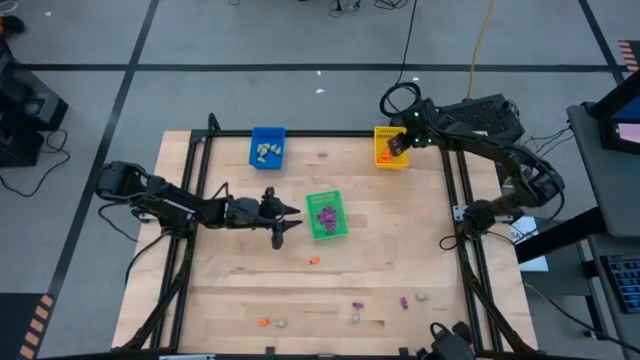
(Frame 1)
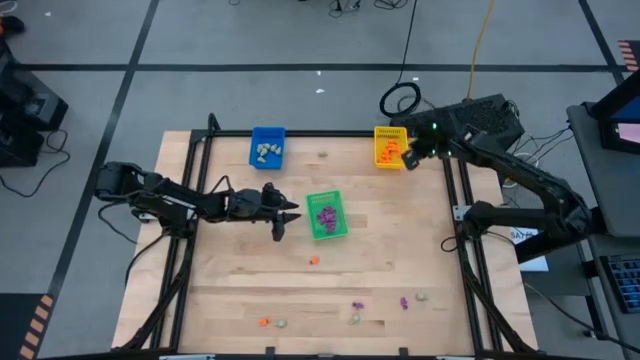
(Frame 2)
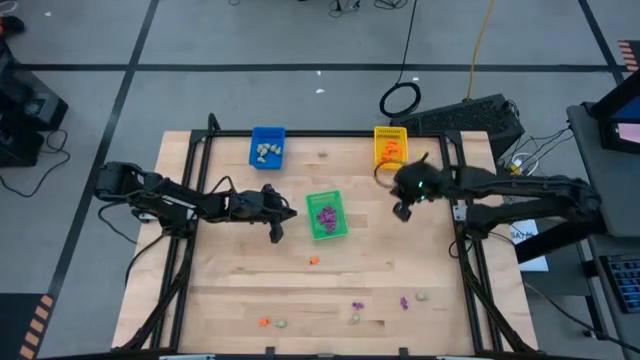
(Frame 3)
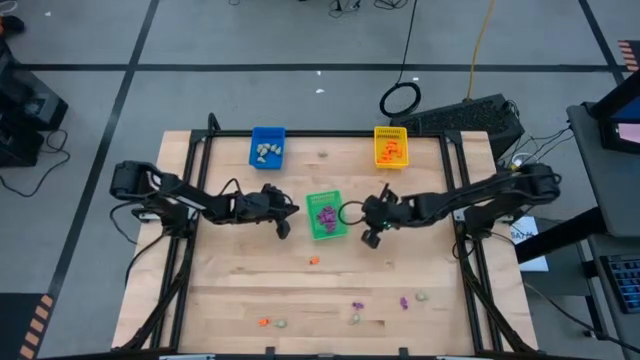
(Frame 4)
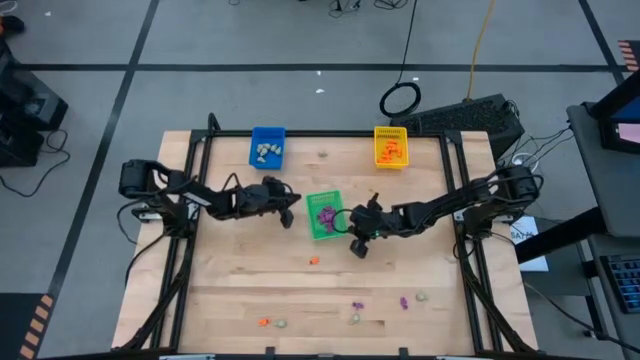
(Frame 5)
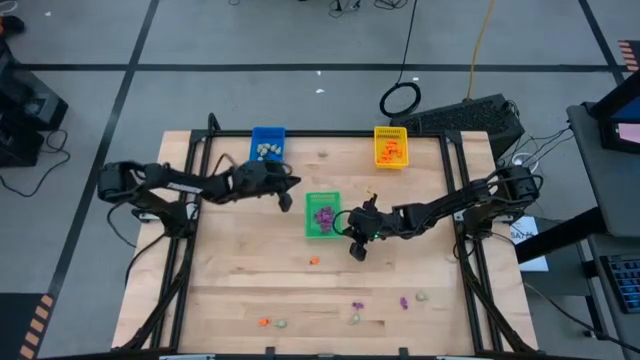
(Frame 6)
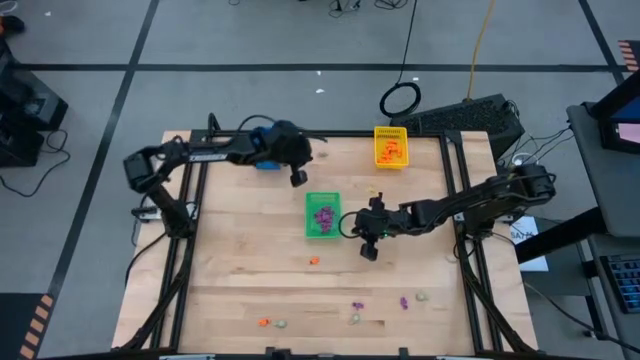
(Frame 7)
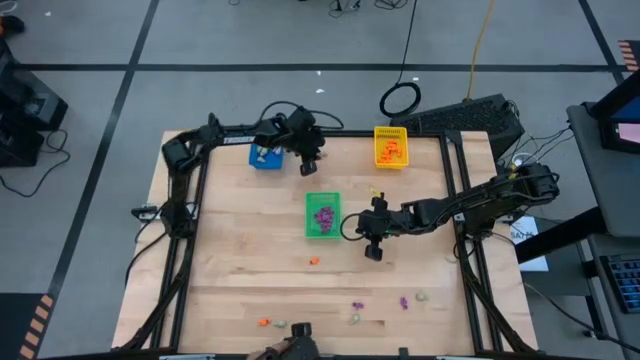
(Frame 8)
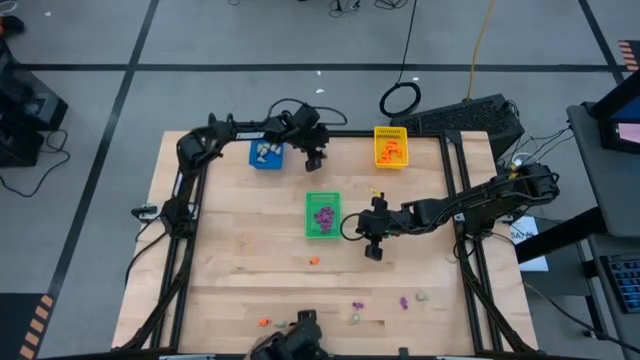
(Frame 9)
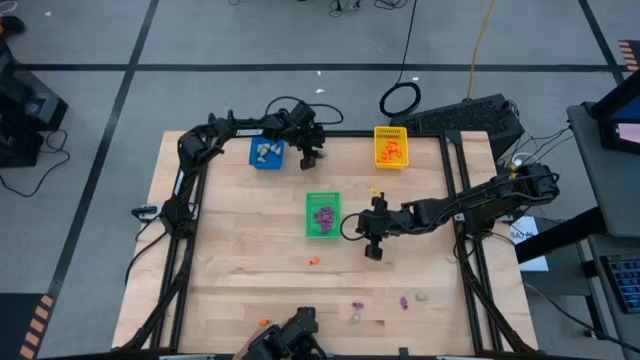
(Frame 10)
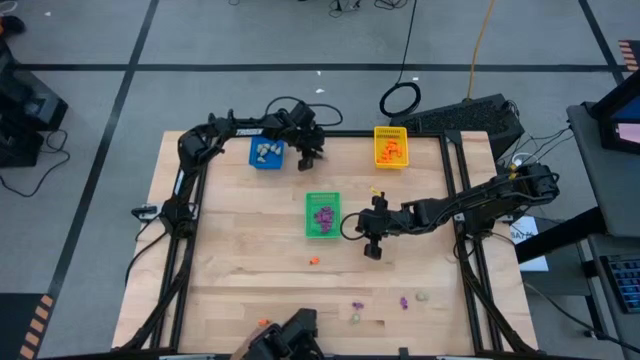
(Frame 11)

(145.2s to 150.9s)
Task: Sort Halloween decoration
Put the white skull toy into the blue bin

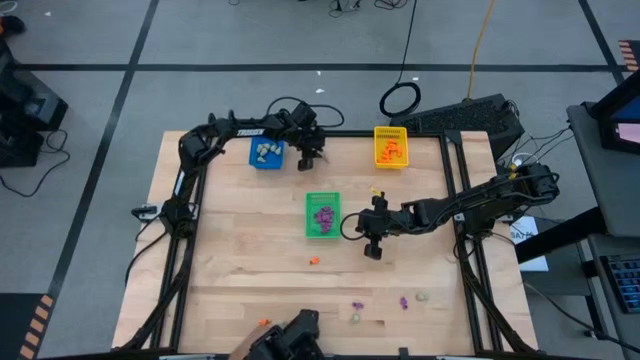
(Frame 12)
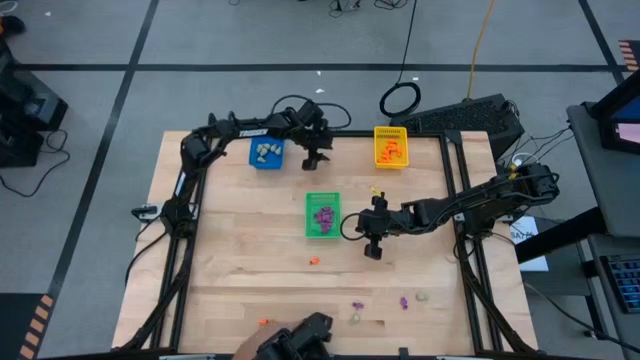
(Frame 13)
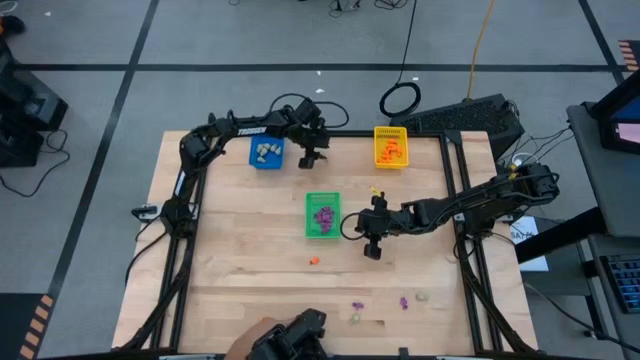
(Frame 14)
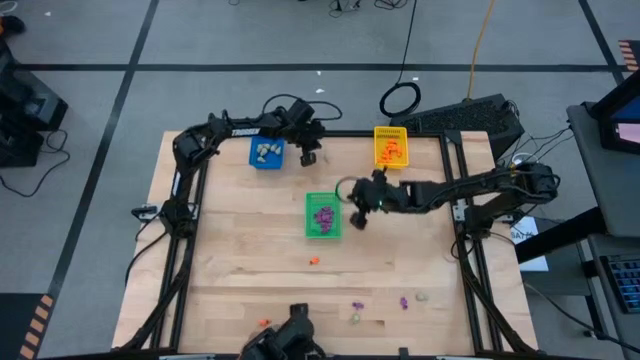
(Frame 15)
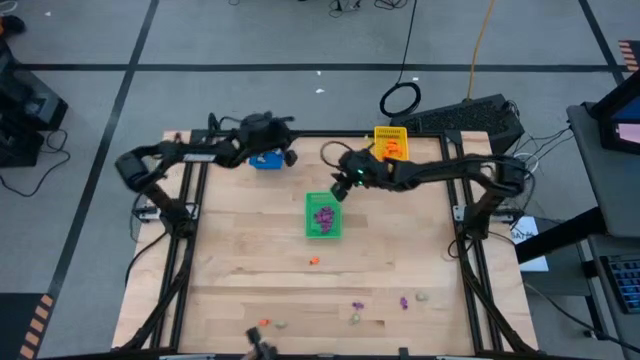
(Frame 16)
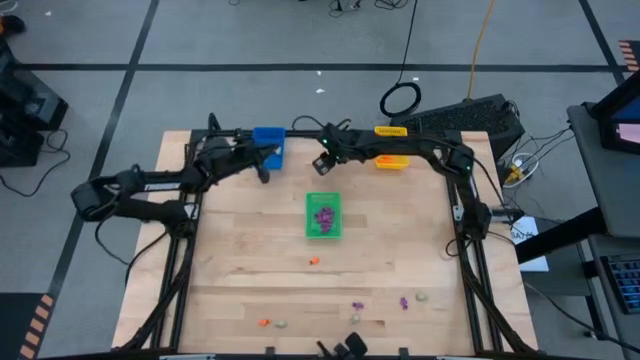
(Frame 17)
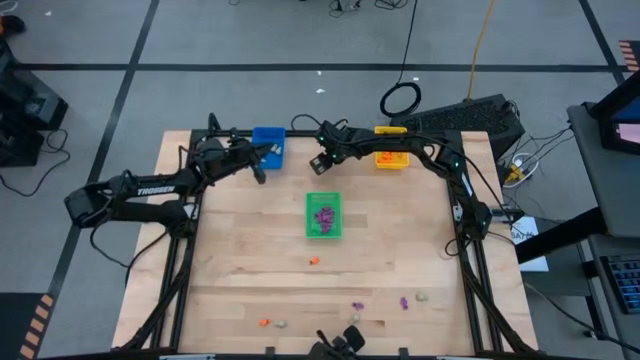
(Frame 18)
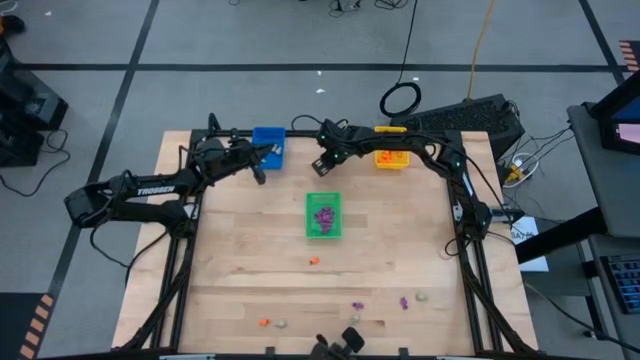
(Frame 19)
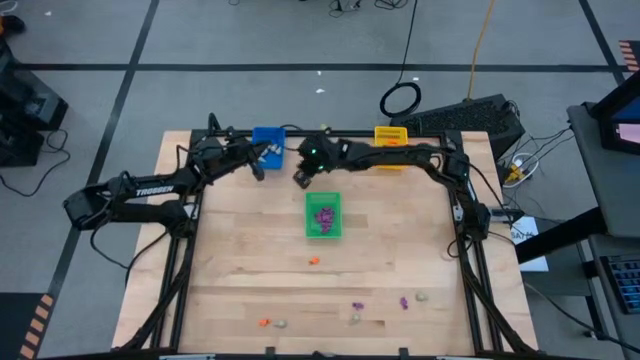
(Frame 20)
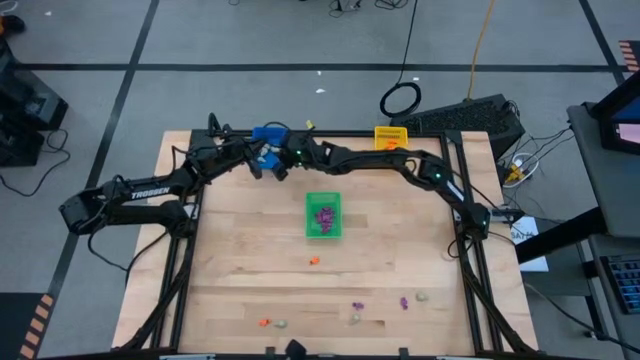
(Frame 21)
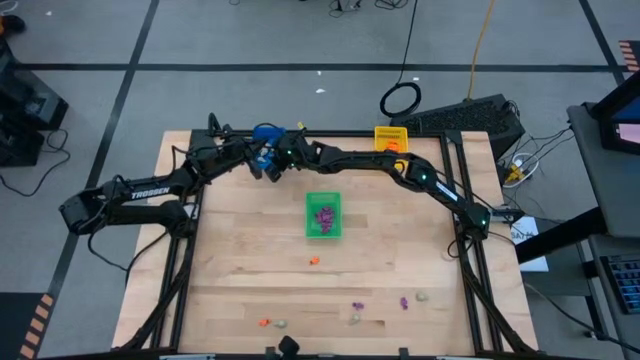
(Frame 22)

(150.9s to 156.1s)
Put the white skull toy into the blue bin

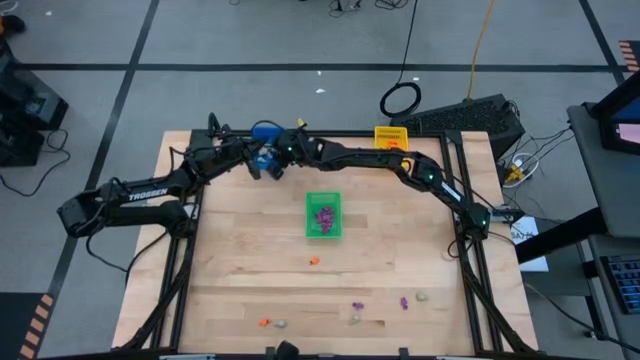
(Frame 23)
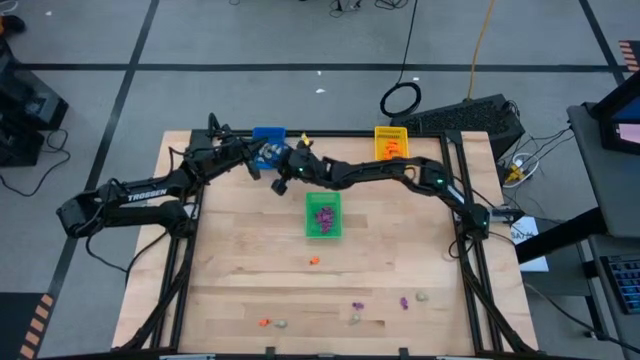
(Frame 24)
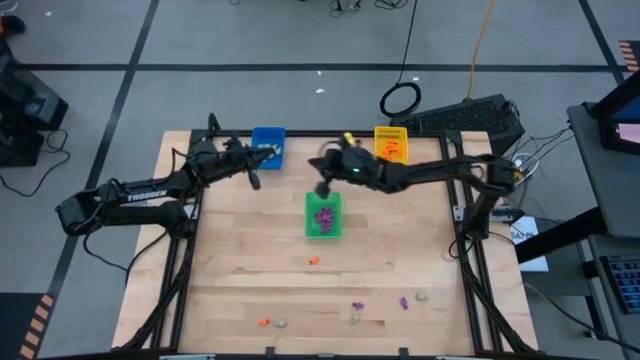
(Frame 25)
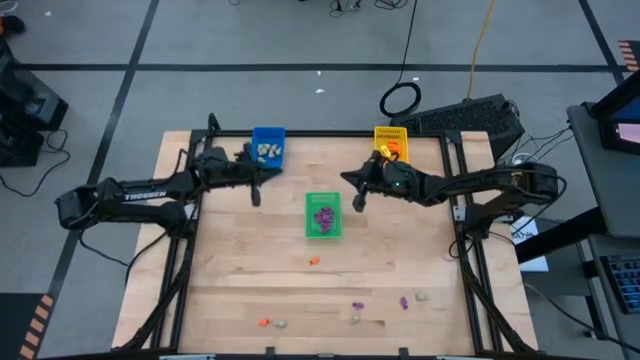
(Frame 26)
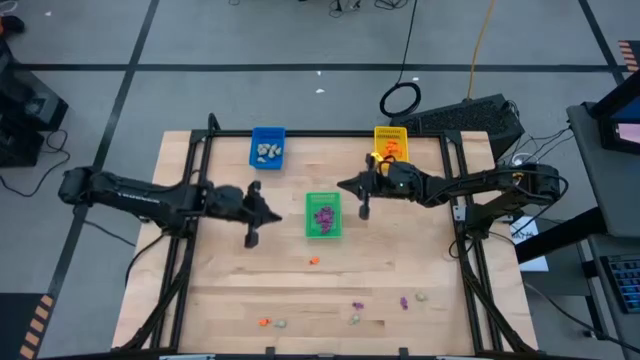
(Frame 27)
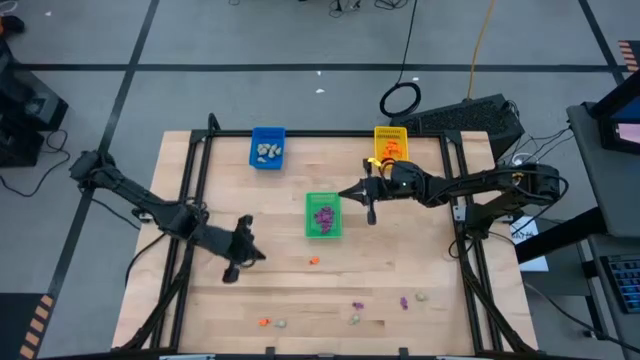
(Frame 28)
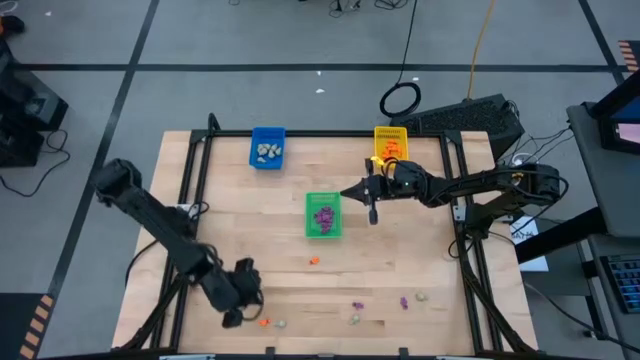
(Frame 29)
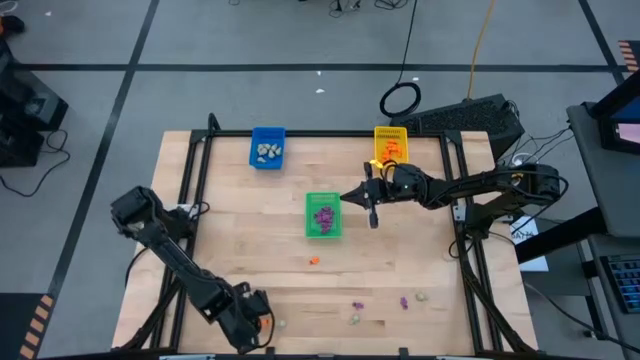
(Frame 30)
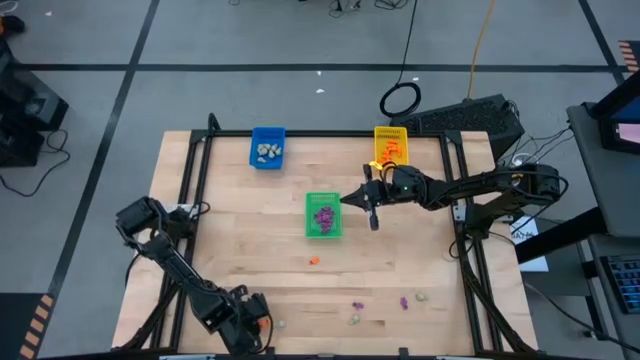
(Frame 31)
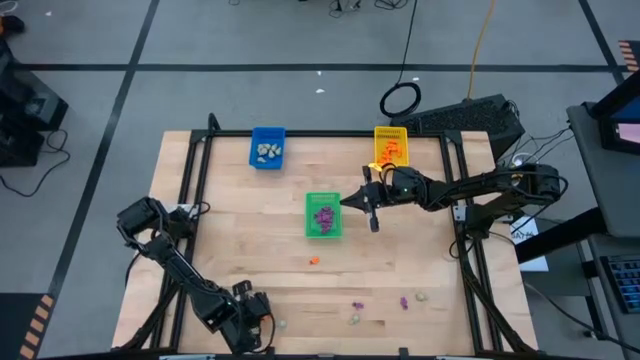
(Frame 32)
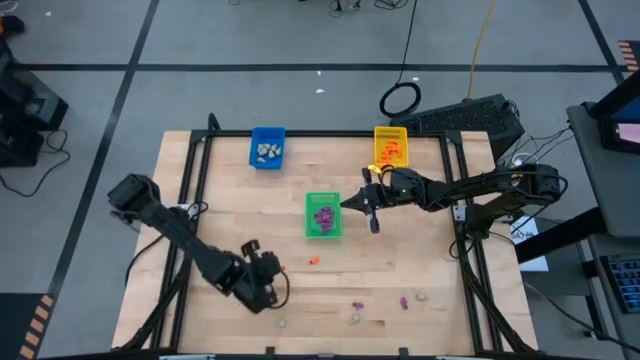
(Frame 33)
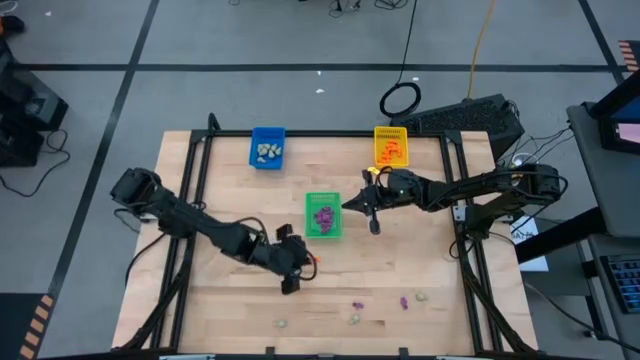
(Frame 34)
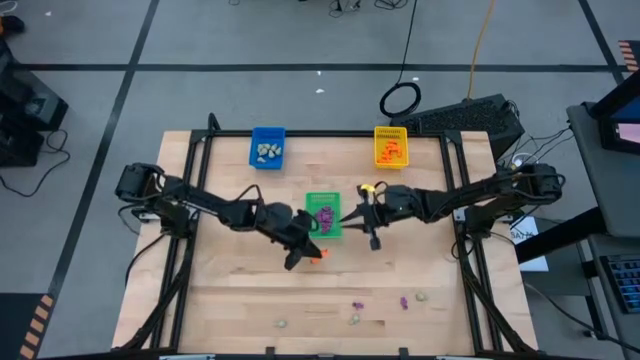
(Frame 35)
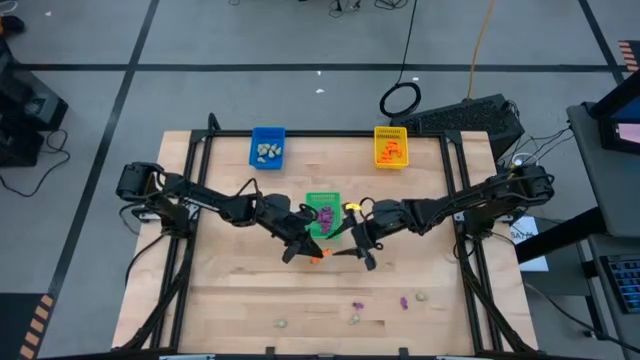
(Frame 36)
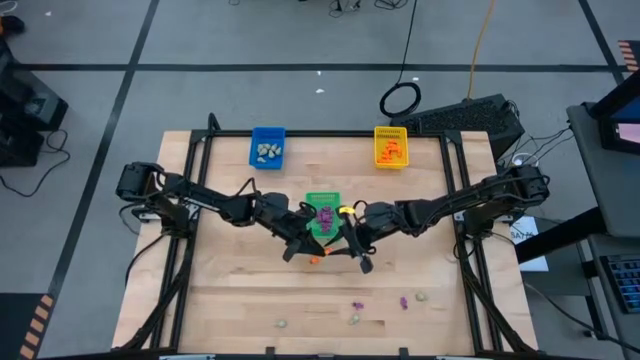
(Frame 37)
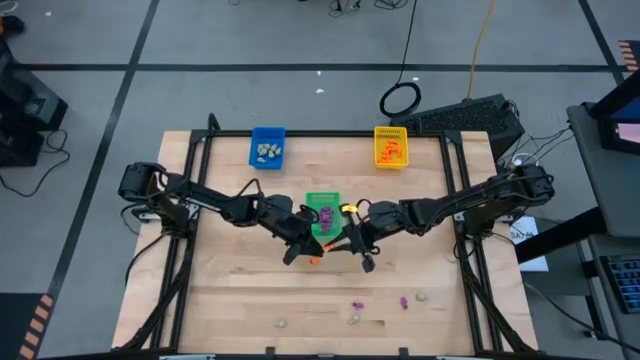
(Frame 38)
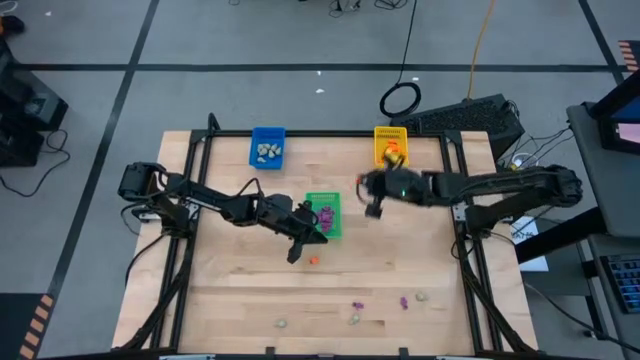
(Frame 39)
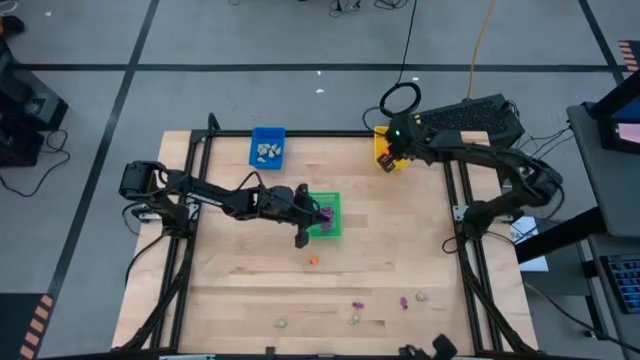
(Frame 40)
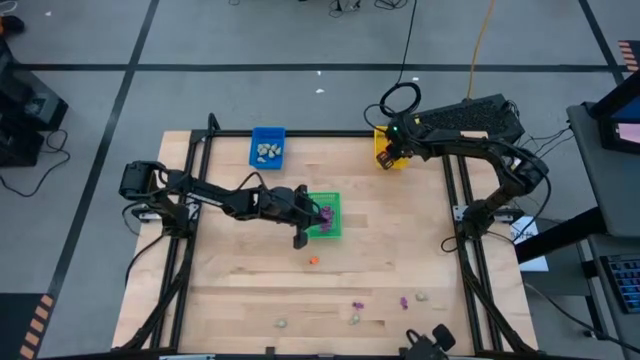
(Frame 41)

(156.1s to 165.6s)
Put the orange skeleton toy into the yellow bin

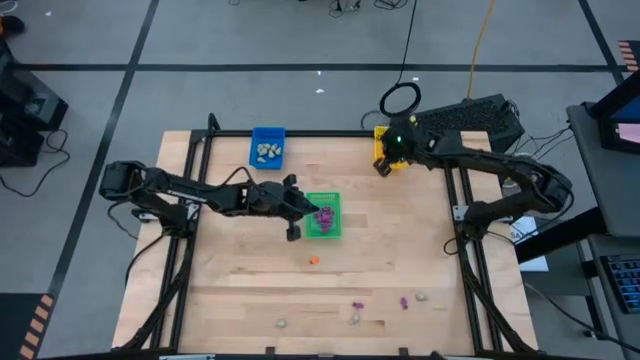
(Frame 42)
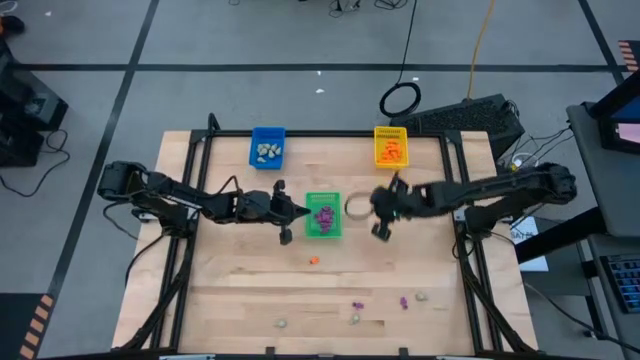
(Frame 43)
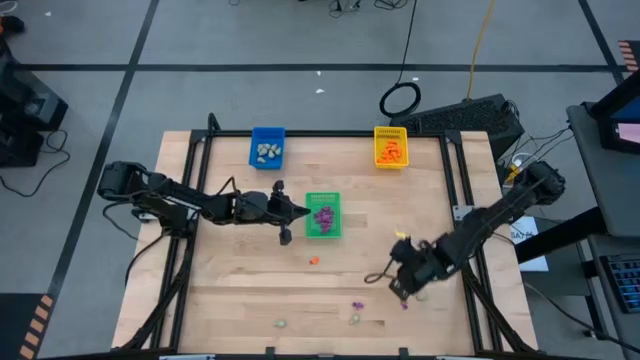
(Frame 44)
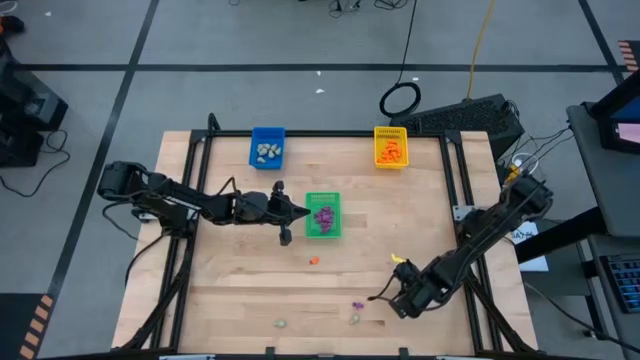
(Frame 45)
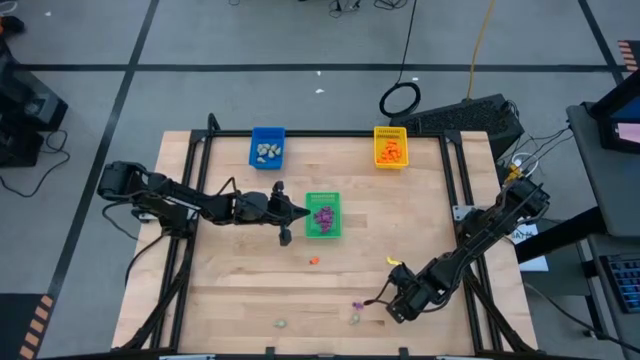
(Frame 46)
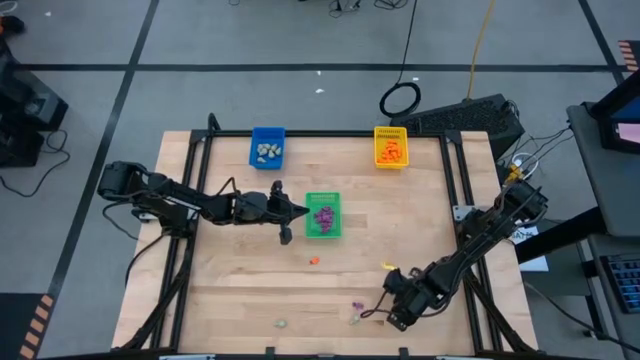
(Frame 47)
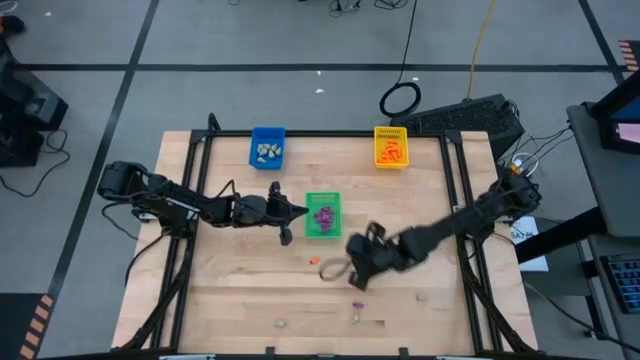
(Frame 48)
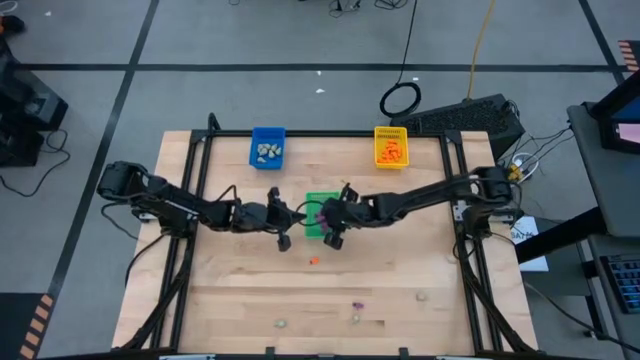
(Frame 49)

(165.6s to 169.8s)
Put the purple skeleton toy into the green bin
